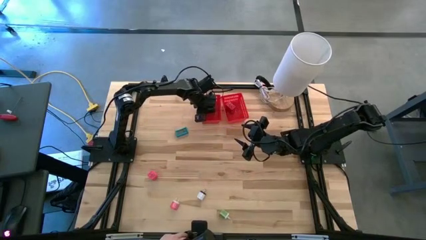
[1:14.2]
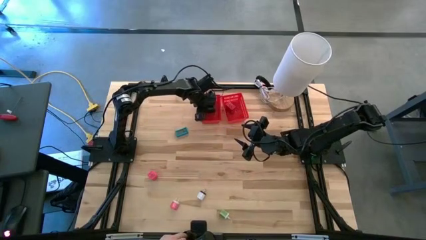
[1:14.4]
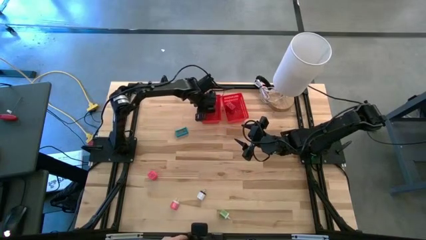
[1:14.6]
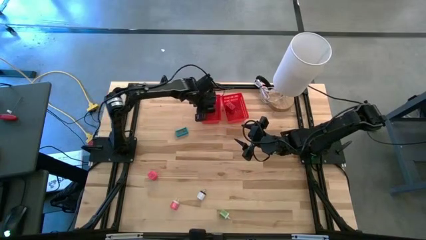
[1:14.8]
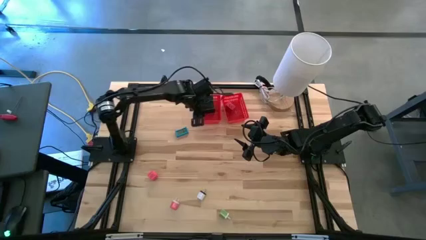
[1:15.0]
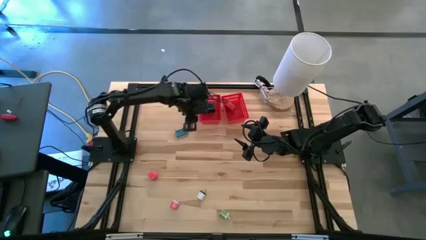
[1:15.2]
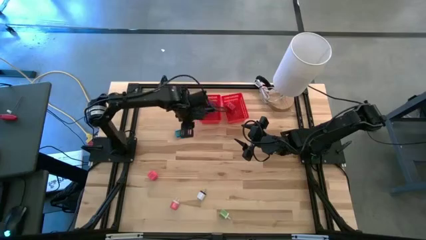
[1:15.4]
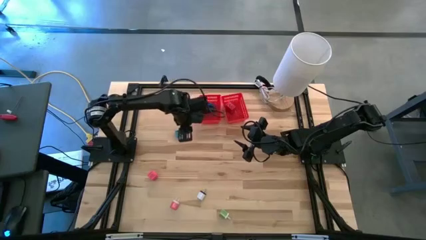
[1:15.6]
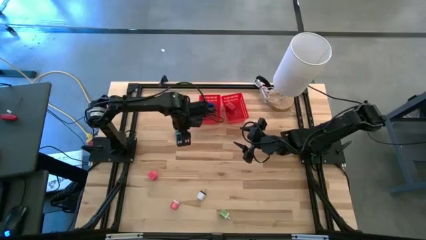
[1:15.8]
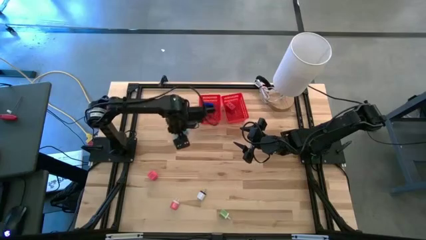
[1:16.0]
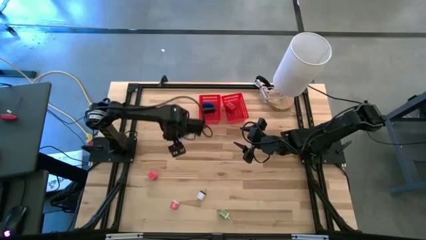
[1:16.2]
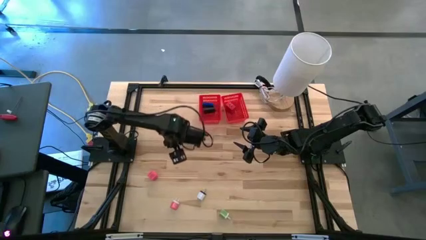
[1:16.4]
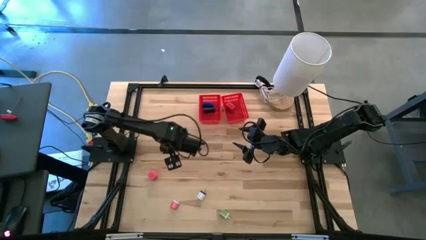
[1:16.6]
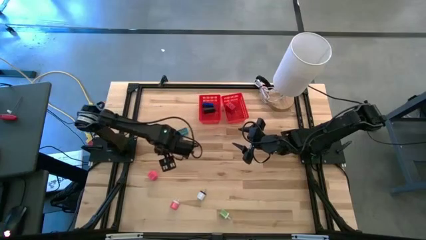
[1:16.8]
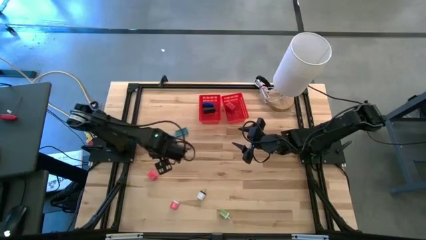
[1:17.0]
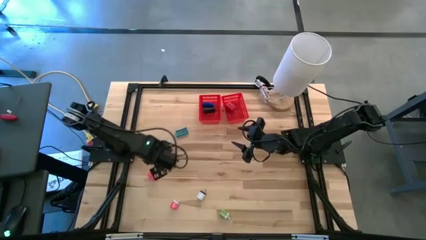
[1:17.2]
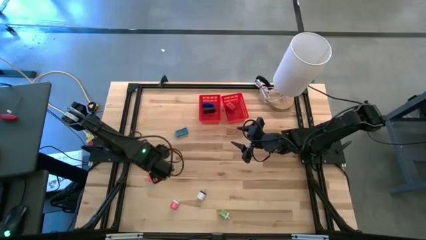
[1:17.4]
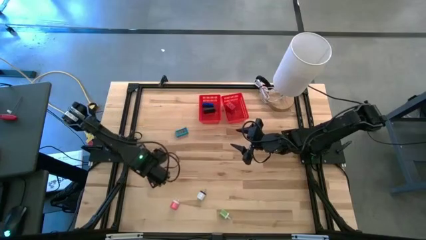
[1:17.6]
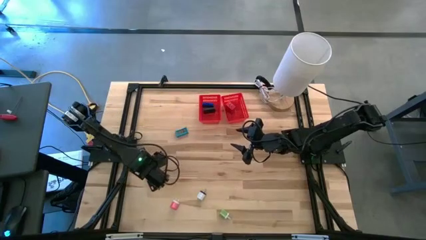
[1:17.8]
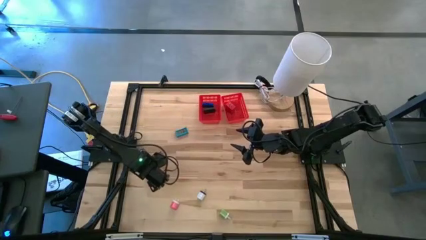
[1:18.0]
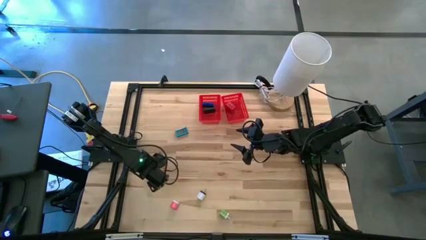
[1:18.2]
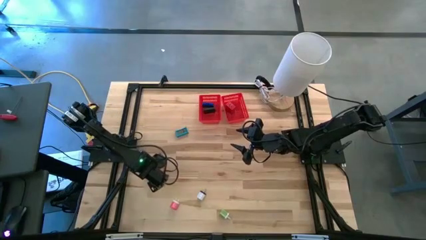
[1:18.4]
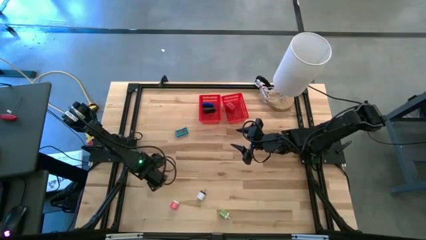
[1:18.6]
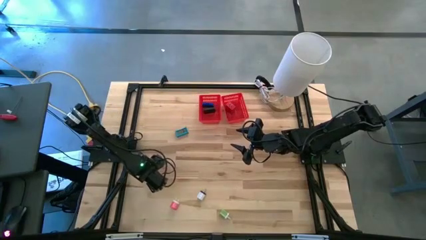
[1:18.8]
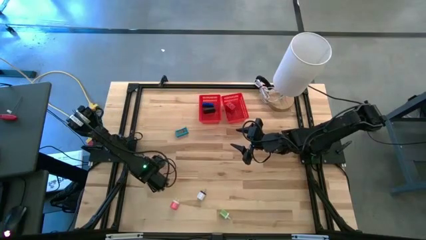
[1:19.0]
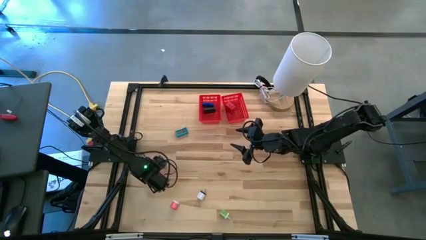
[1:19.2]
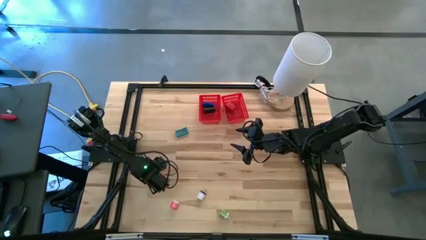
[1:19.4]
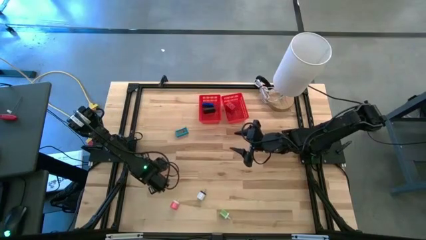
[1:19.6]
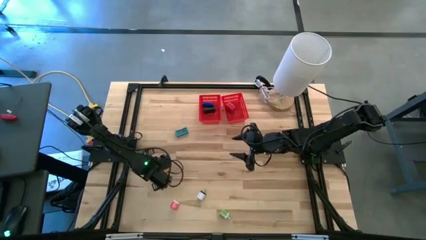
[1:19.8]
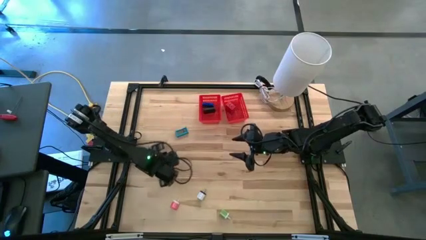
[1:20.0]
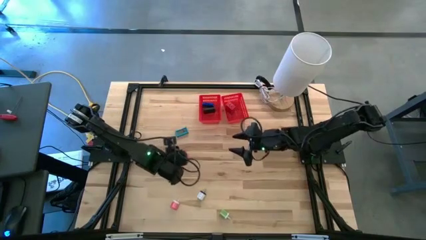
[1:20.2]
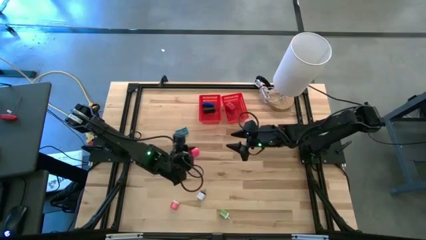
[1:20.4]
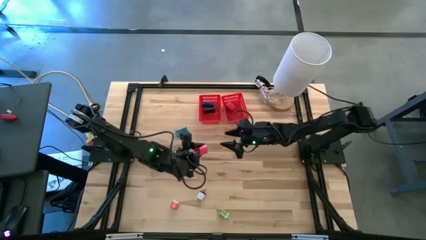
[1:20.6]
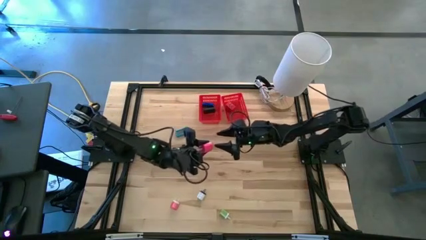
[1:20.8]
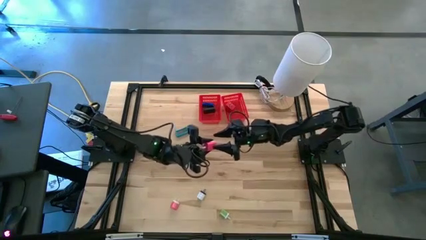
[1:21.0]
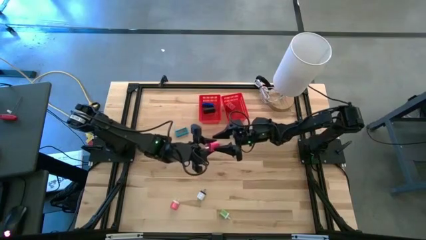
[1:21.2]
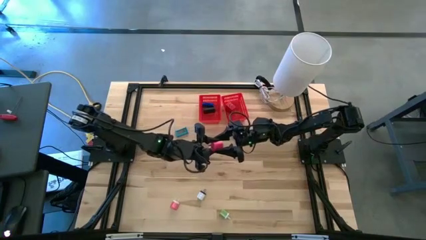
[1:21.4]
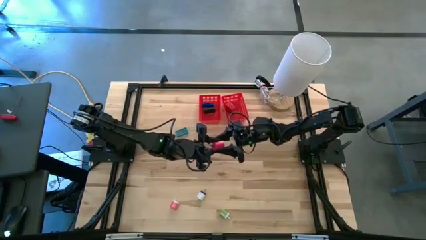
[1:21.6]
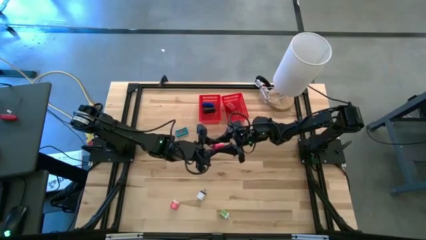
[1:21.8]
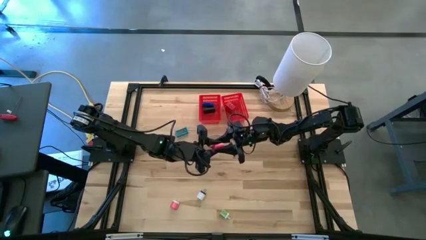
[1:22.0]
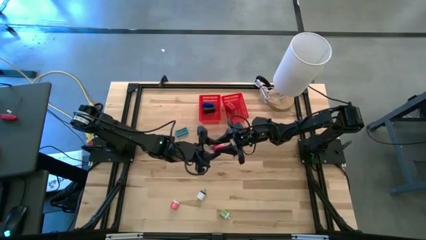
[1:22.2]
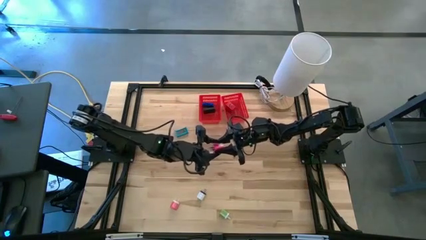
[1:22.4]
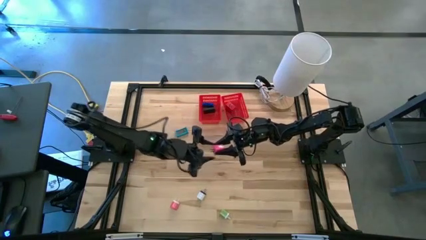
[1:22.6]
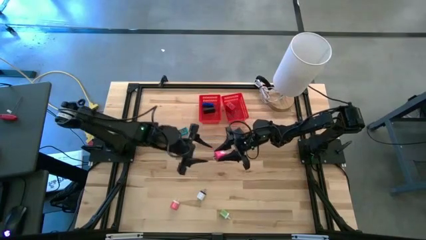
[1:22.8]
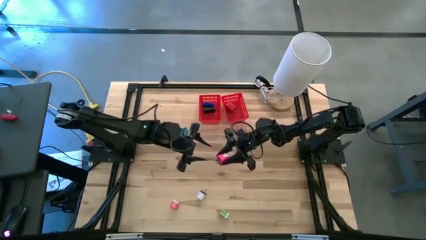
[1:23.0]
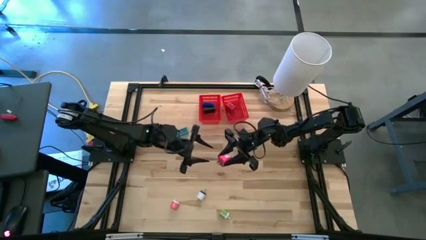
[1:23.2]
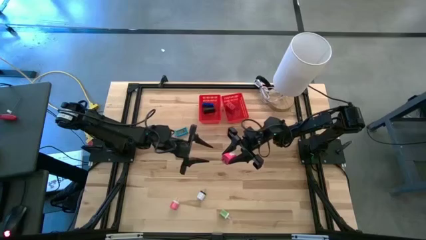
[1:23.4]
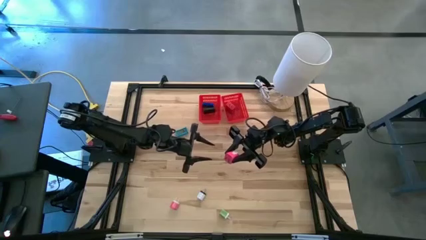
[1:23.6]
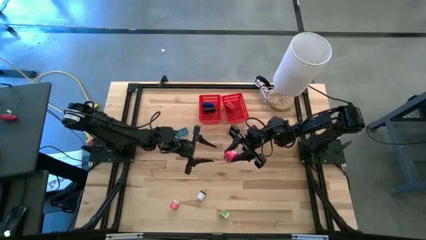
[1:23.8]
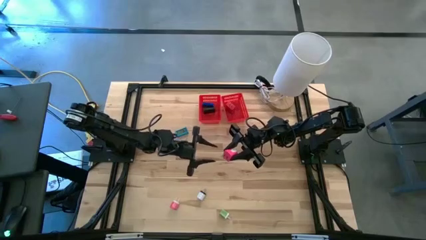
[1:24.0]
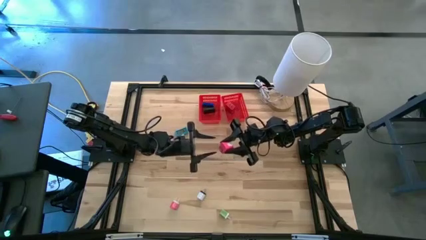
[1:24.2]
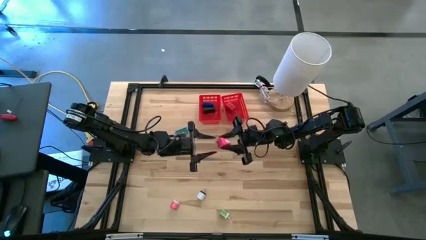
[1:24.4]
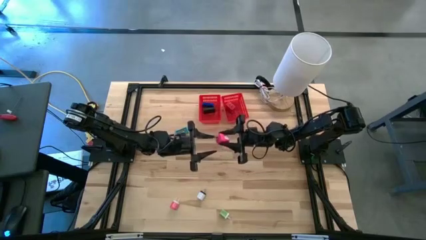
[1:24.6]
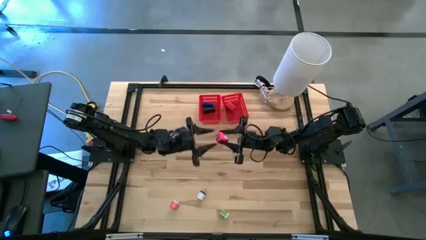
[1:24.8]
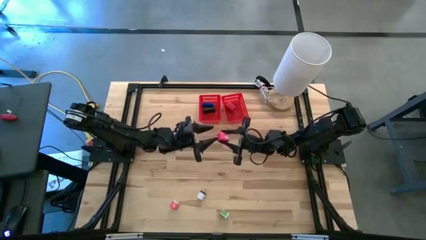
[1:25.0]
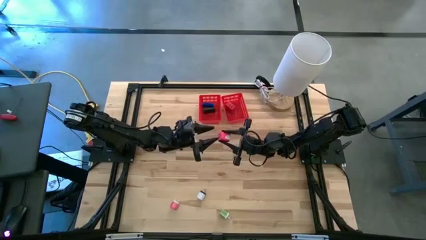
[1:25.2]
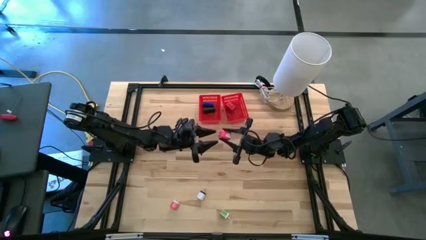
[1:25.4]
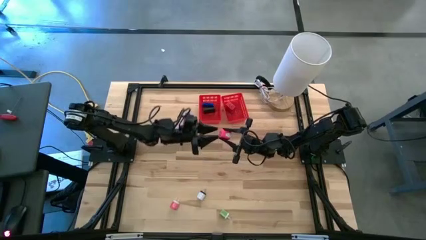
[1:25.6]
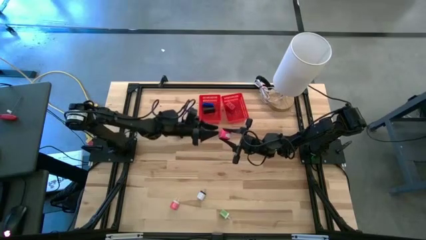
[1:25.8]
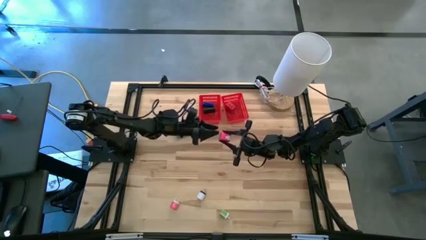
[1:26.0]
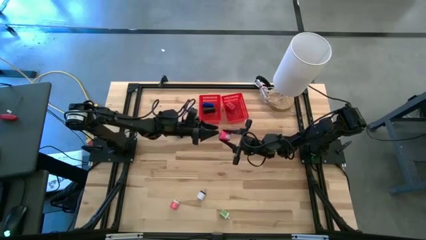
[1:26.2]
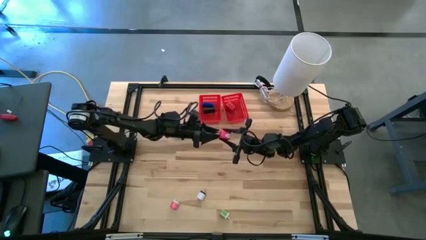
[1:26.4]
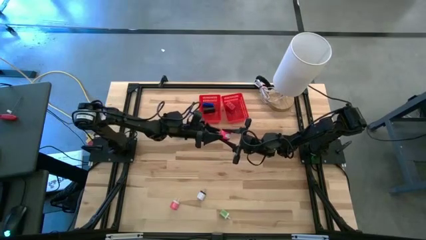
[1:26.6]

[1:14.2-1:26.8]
Task: Pick & Place Office items
Put the pink charger adapter into the right red bin
